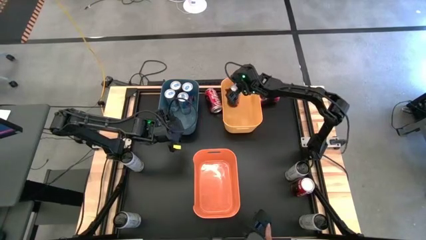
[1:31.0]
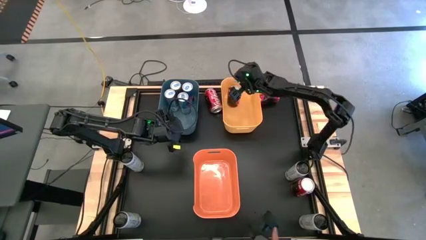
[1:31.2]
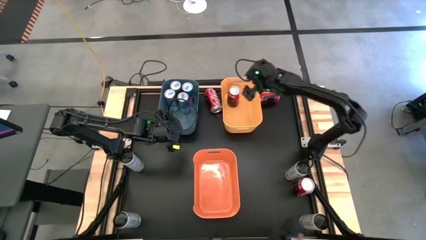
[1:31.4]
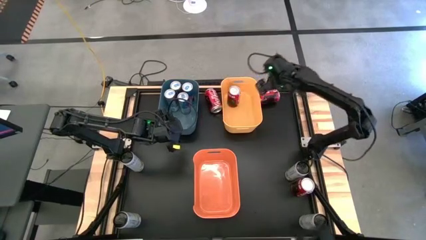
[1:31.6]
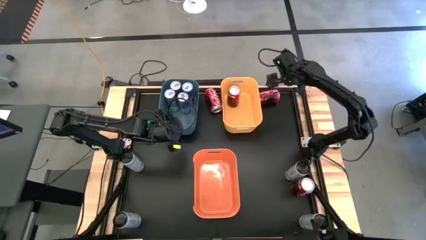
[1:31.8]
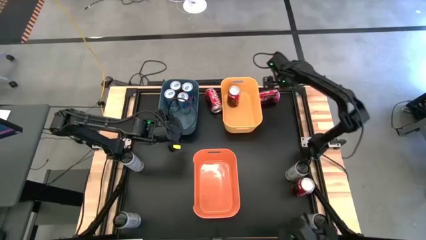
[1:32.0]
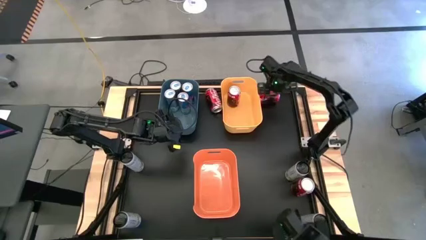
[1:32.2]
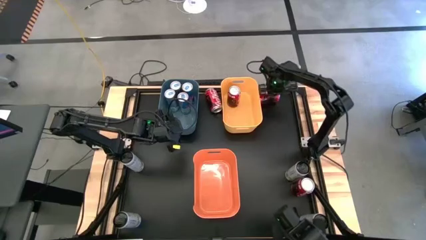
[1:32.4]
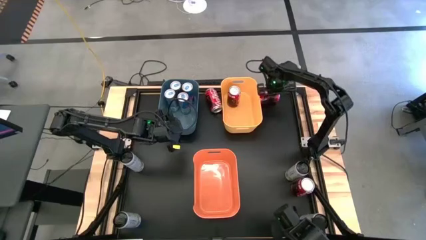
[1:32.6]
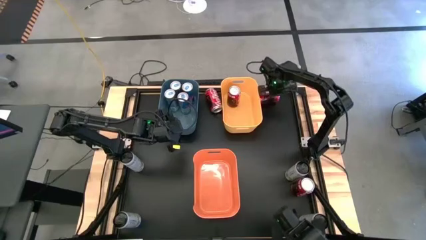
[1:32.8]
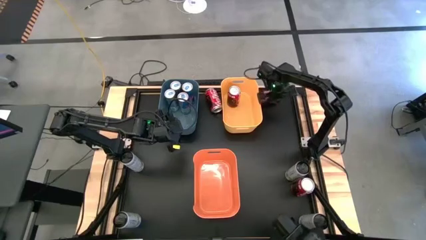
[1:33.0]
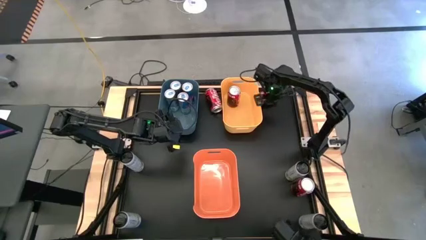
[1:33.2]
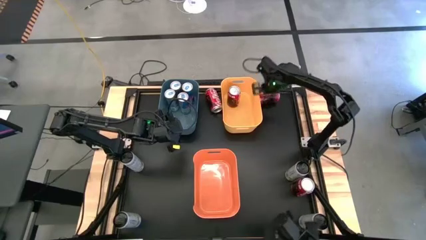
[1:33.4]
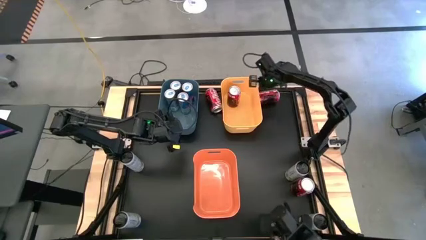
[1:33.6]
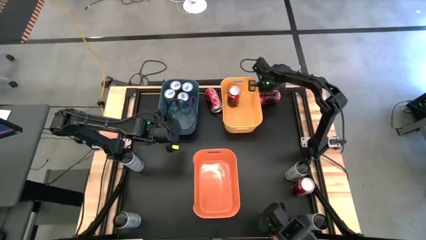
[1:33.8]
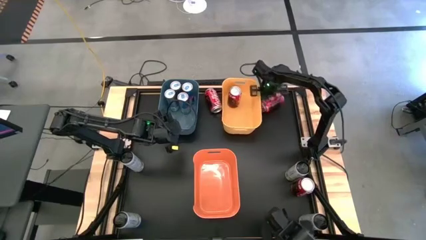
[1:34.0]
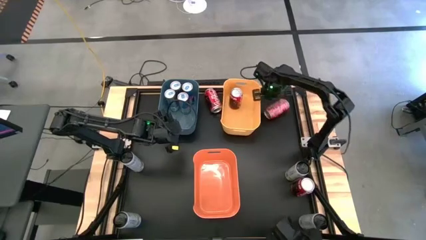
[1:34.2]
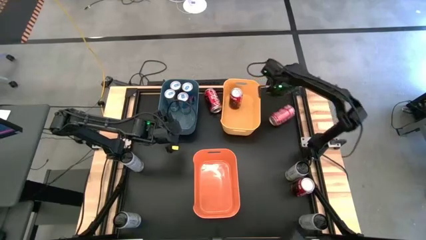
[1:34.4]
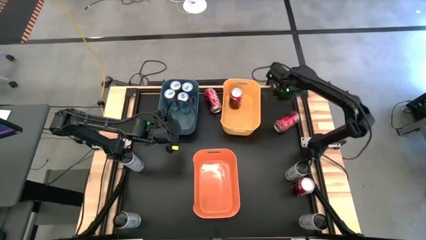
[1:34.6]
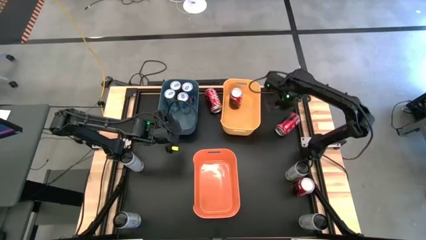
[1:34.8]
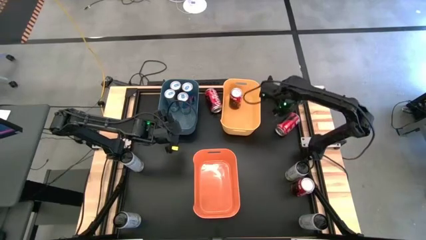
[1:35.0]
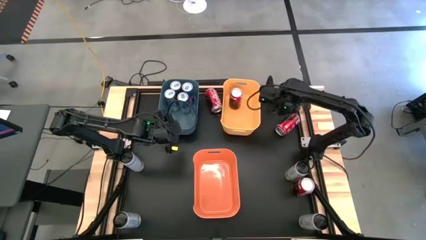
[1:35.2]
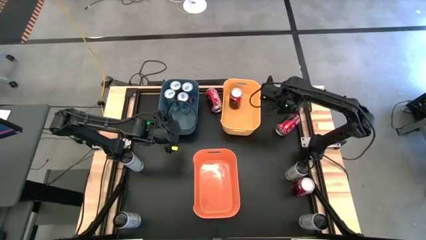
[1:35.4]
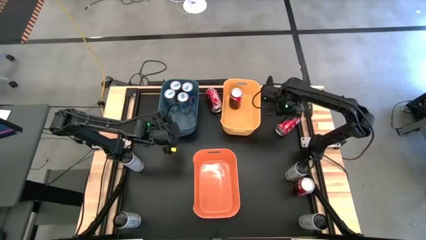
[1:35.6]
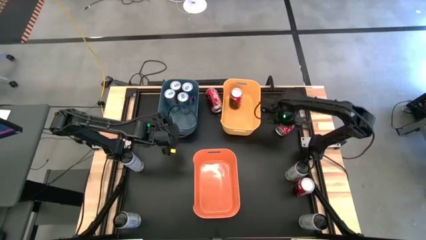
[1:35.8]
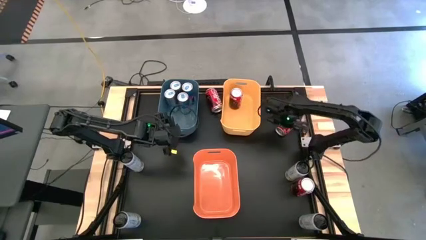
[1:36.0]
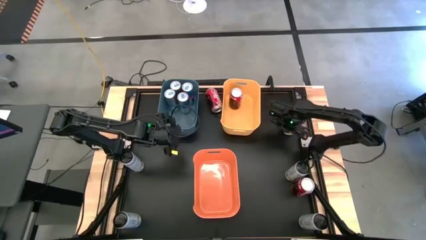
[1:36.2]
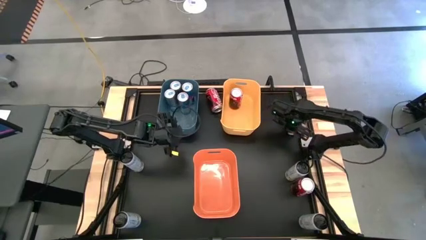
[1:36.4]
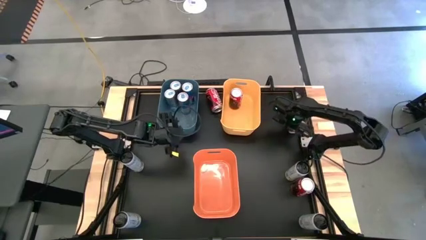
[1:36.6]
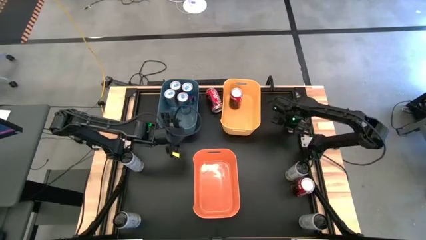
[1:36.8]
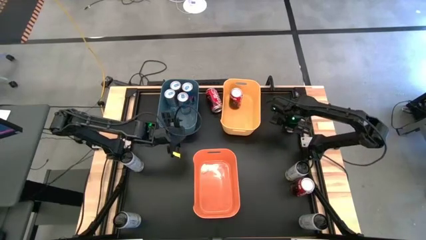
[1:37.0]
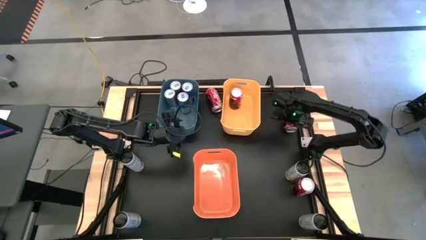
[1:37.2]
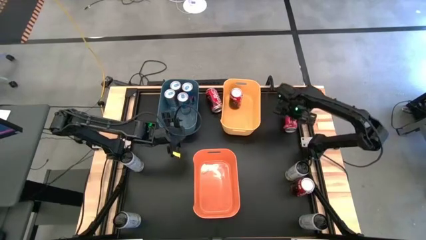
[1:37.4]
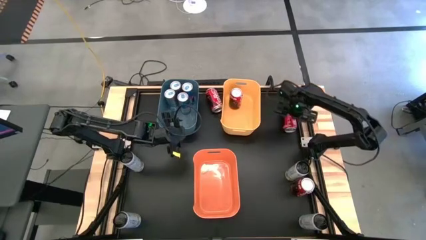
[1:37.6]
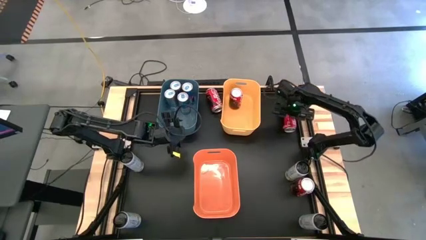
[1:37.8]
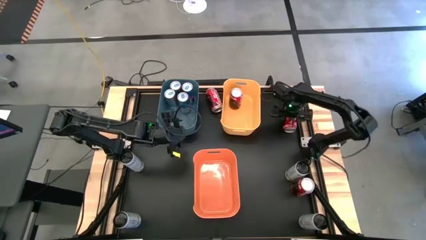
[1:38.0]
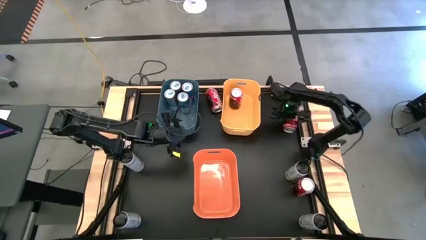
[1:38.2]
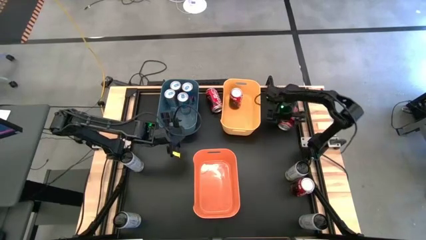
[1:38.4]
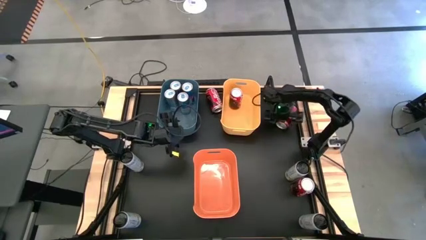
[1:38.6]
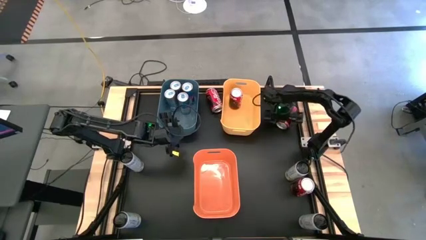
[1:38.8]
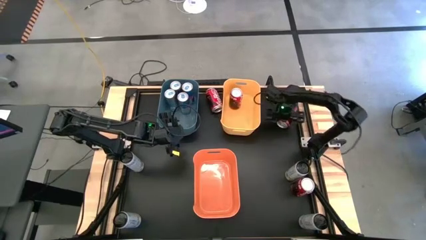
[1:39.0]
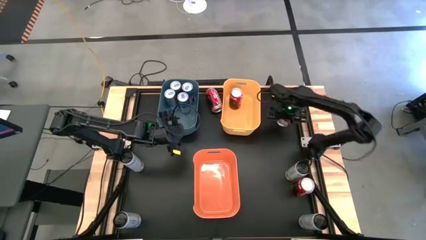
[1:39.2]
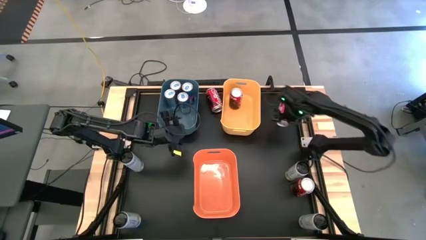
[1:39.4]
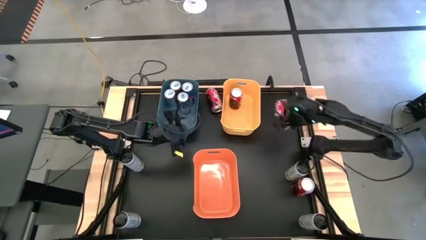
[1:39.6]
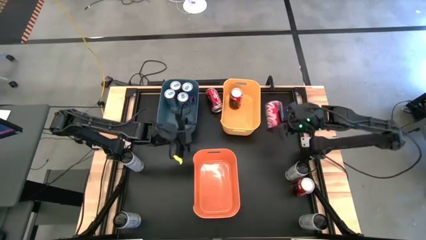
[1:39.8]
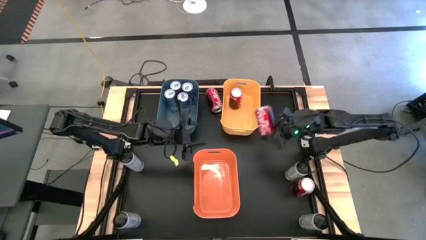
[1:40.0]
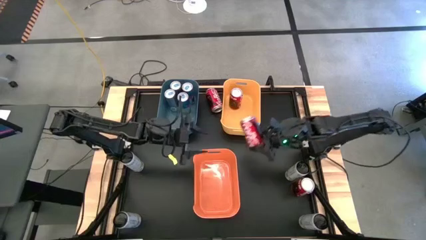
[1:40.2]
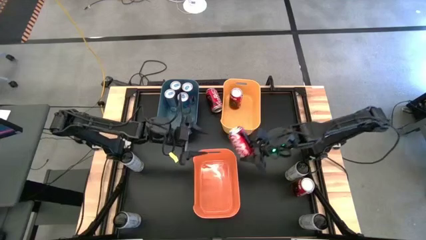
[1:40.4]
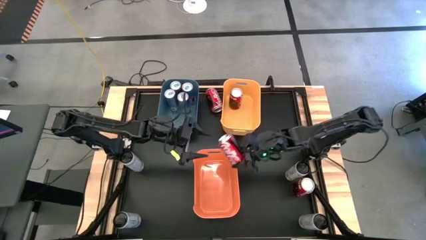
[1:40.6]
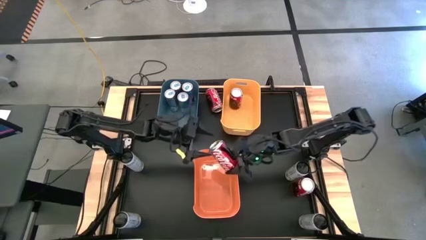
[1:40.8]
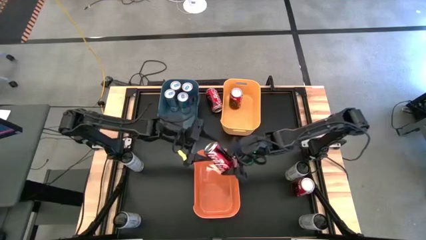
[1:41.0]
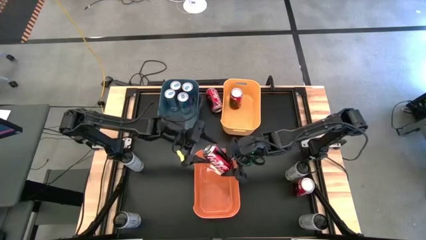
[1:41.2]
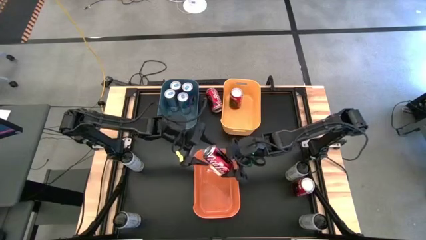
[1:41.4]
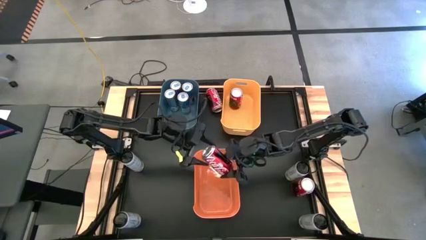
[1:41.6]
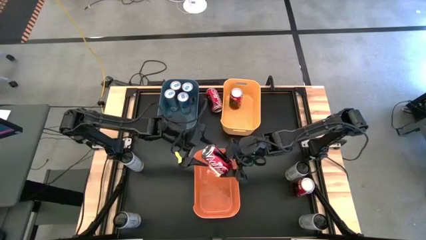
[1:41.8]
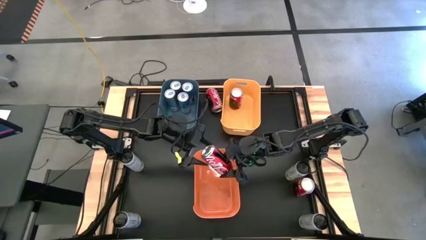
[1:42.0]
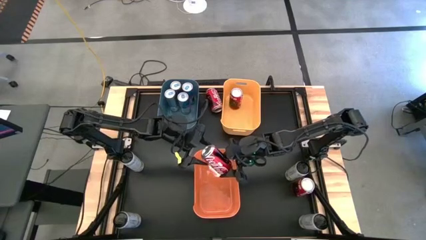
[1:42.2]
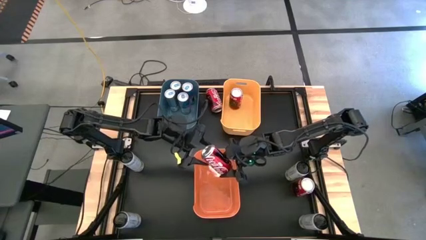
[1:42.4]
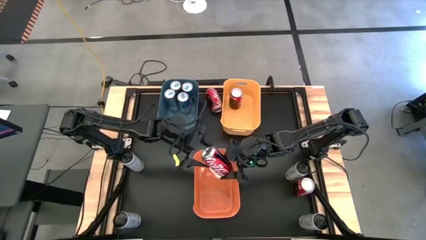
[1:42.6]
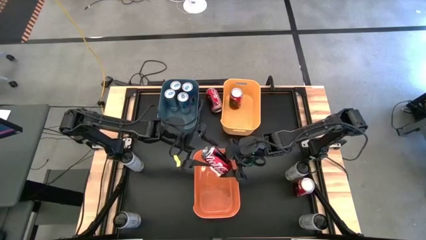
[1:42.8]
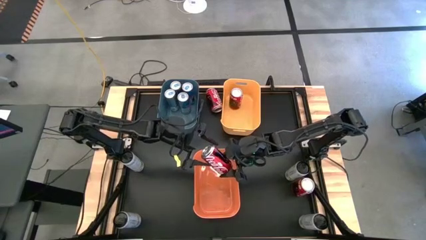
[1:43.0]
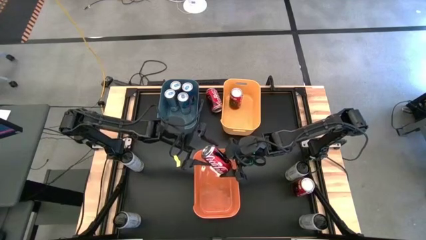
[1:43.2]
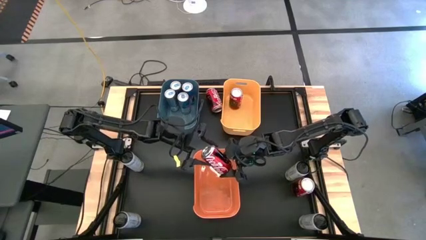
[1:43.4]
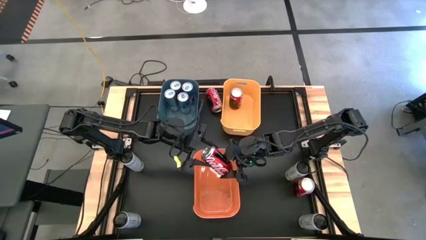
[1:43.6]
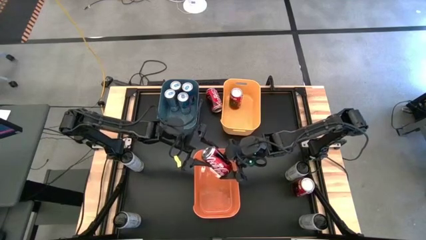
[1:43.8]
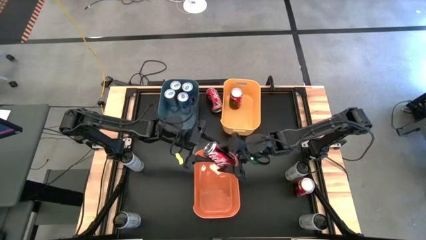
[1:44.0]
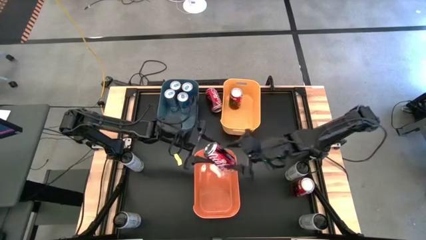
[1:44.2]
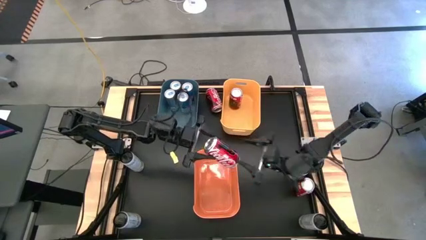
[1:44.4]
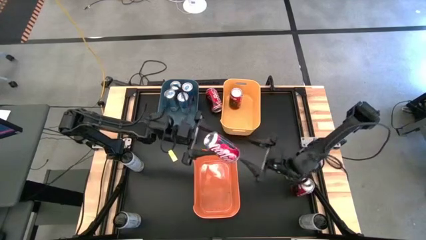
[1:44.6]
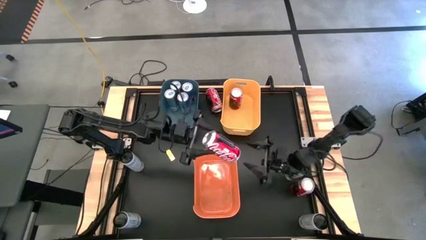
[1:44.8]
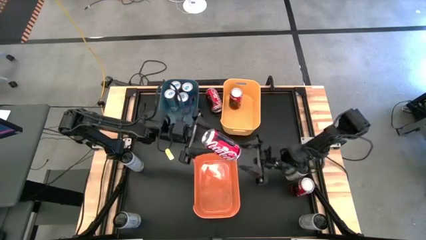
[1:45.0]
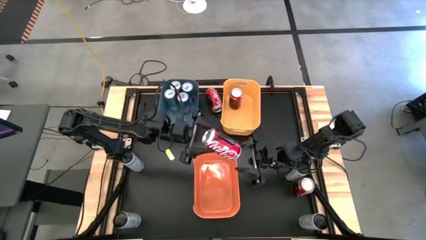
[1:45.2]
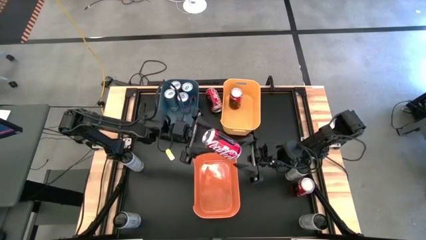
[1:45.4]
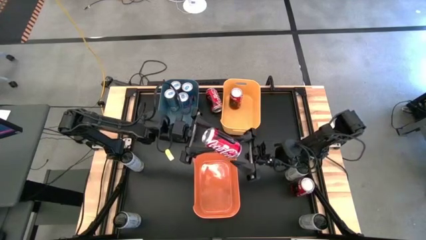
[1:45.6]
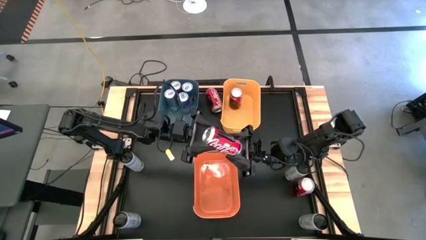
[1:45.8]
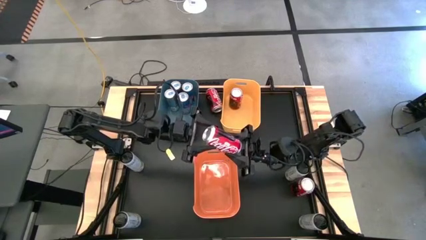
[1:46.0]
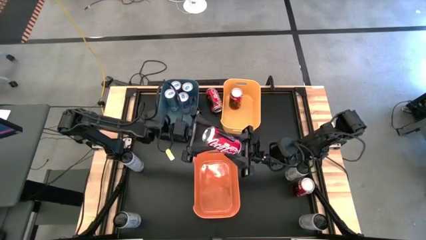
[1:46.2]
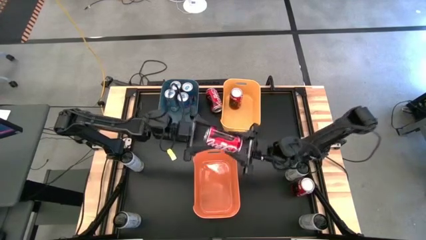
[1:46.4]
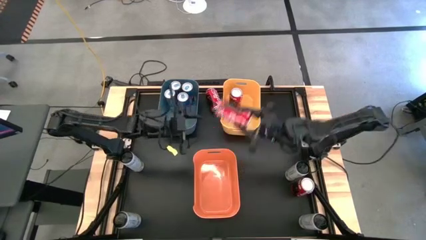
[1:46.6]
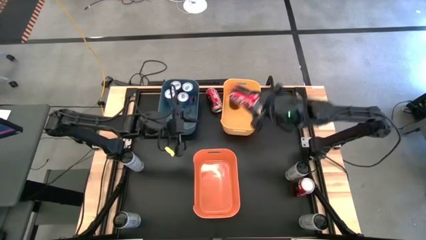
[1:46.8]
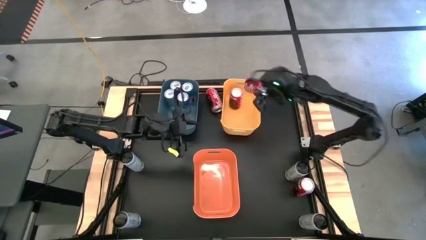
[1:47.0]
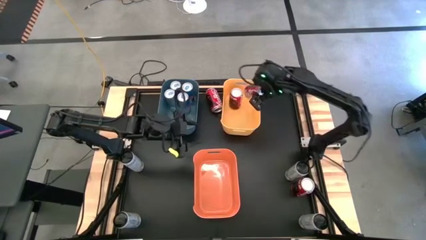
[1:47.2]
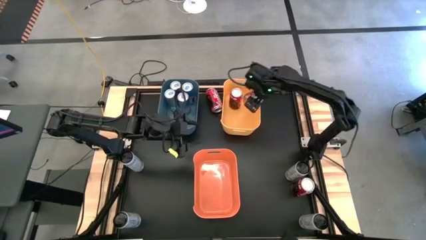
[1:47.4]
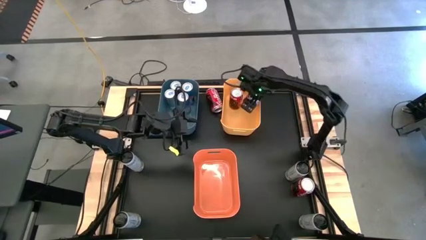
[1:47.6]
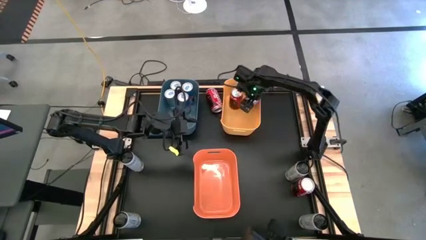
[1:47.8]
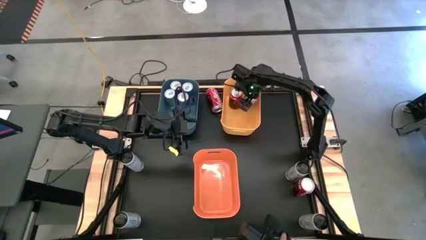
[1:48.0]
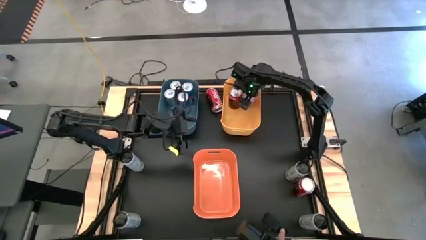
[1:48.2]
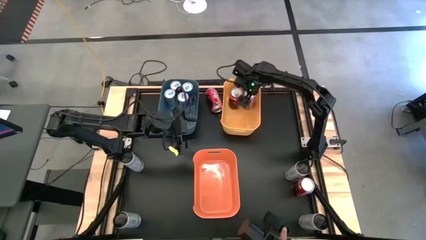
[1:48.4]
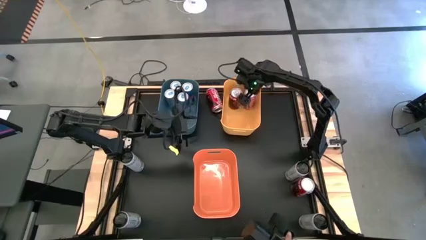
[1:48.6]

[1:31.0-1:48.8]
Task: Sort soda cans
Put the top right red soda can into the yellow bin
